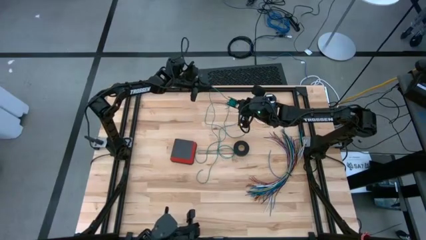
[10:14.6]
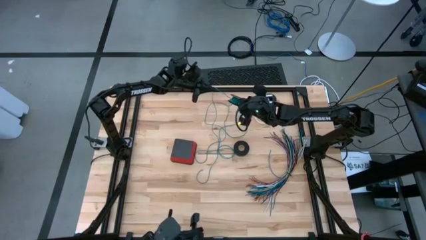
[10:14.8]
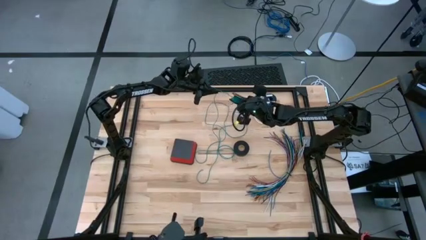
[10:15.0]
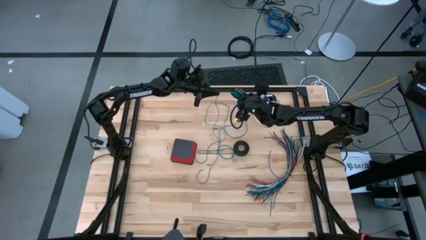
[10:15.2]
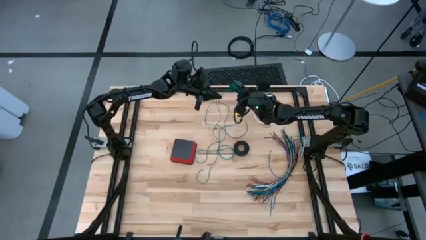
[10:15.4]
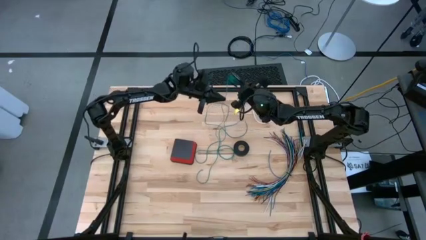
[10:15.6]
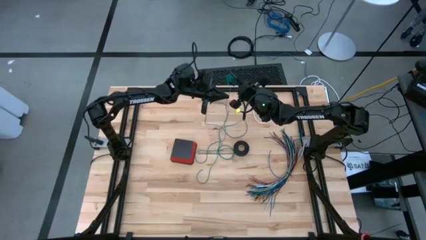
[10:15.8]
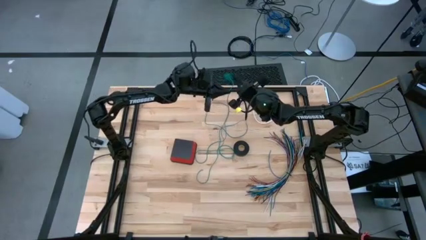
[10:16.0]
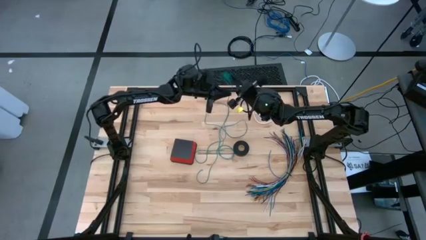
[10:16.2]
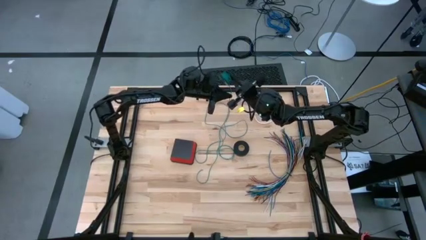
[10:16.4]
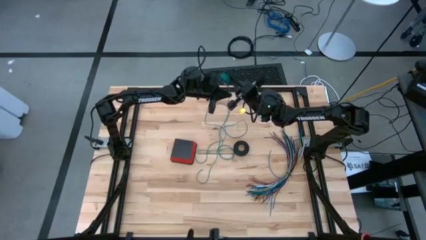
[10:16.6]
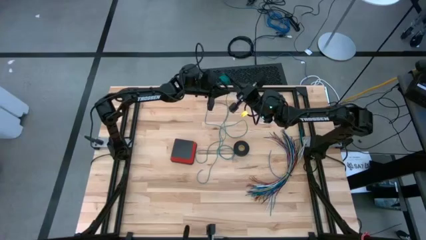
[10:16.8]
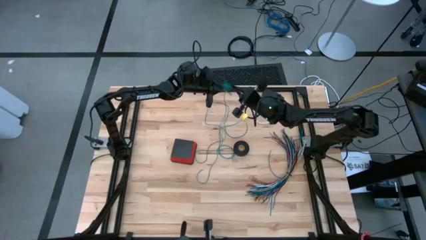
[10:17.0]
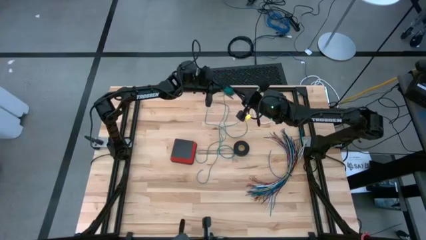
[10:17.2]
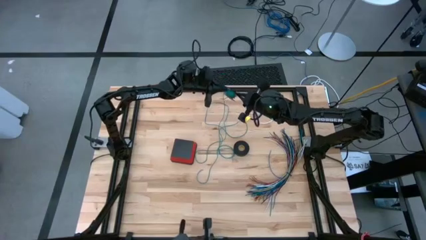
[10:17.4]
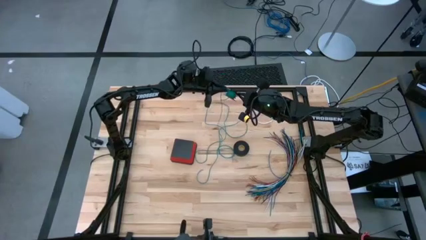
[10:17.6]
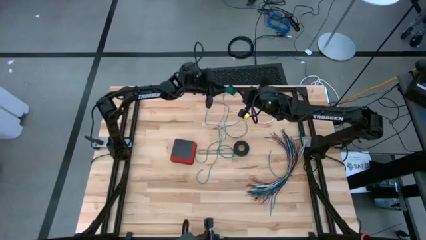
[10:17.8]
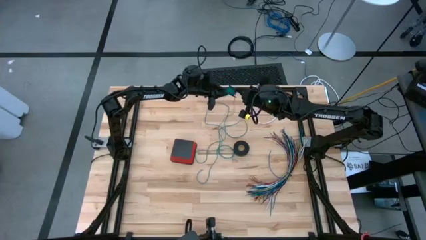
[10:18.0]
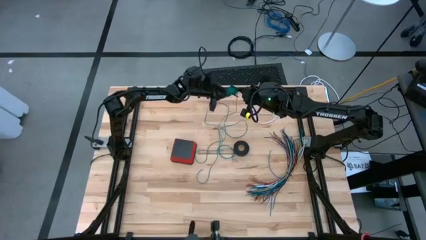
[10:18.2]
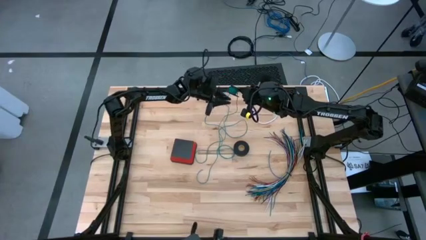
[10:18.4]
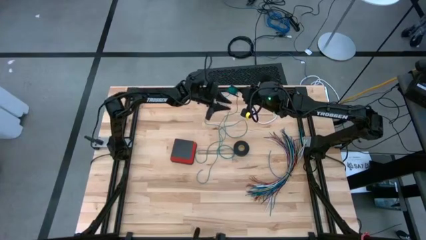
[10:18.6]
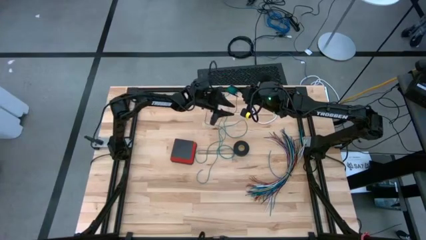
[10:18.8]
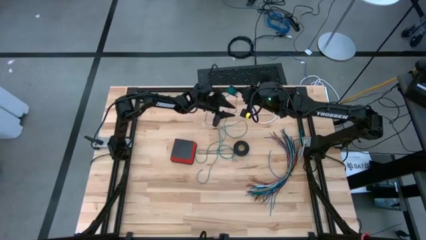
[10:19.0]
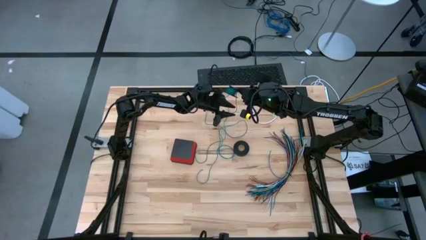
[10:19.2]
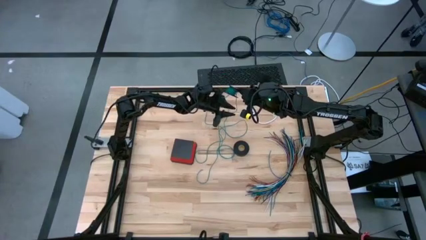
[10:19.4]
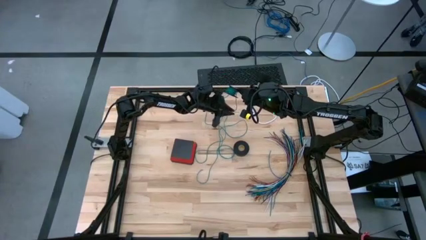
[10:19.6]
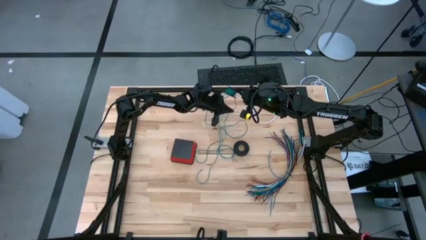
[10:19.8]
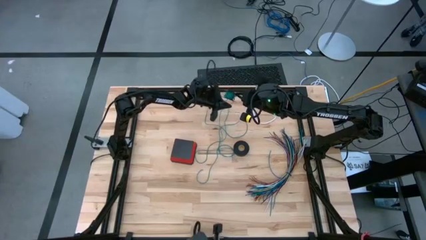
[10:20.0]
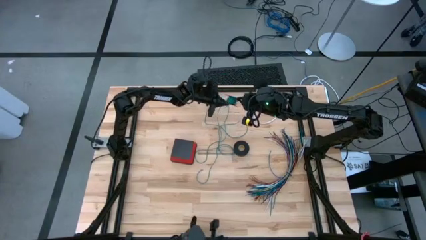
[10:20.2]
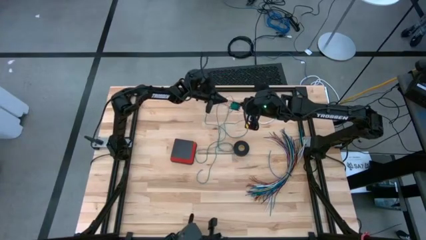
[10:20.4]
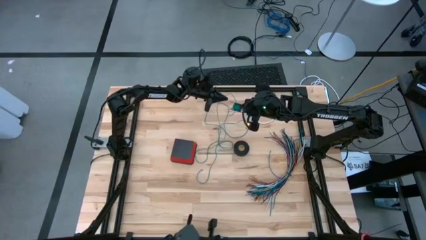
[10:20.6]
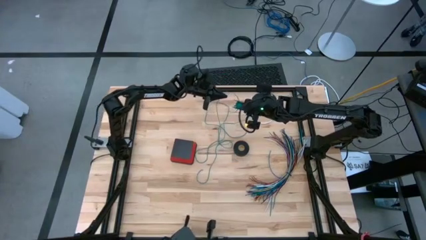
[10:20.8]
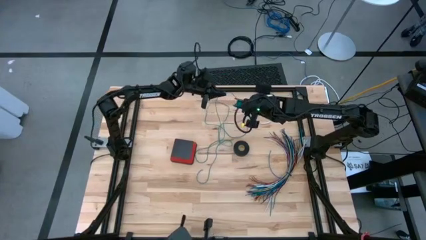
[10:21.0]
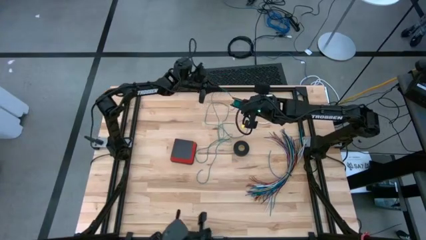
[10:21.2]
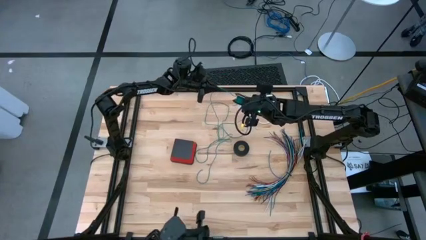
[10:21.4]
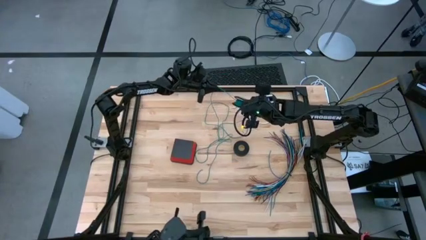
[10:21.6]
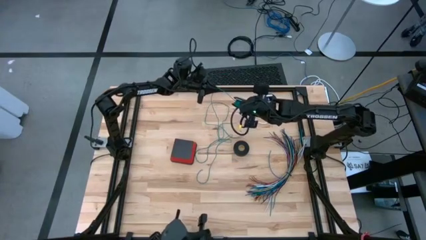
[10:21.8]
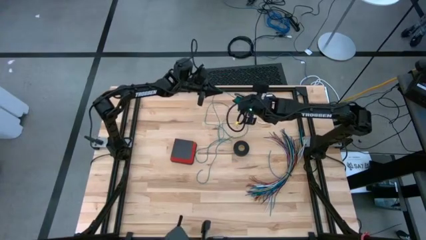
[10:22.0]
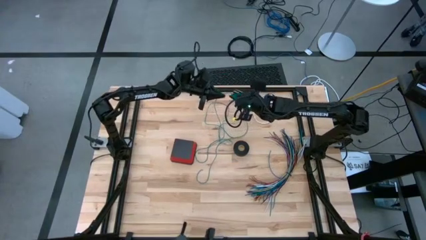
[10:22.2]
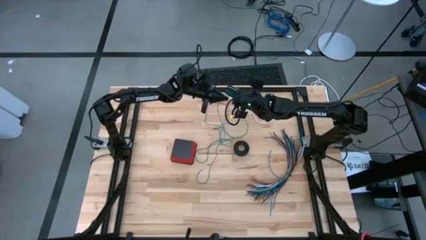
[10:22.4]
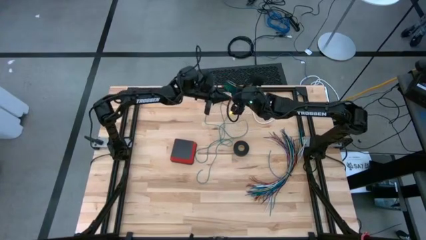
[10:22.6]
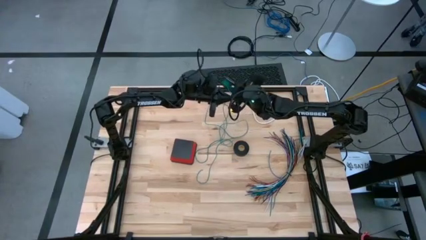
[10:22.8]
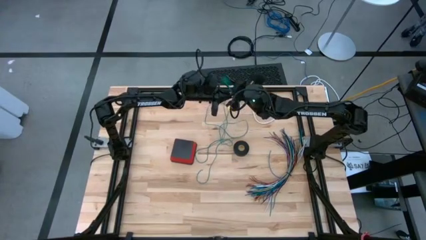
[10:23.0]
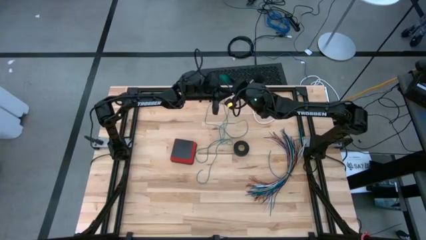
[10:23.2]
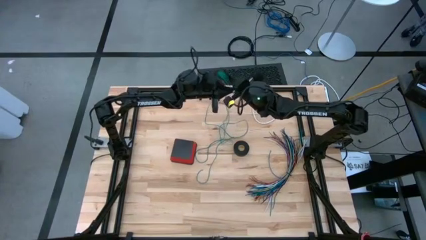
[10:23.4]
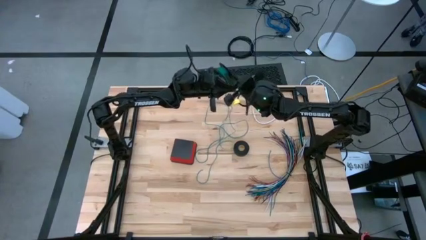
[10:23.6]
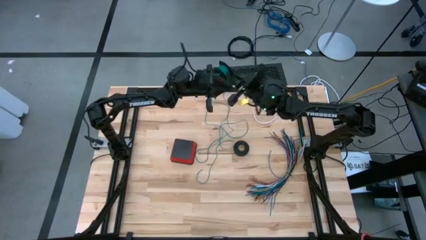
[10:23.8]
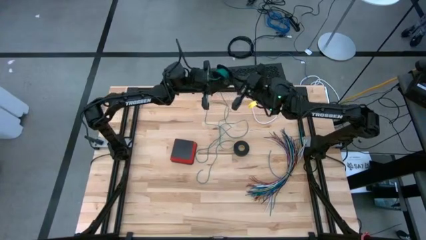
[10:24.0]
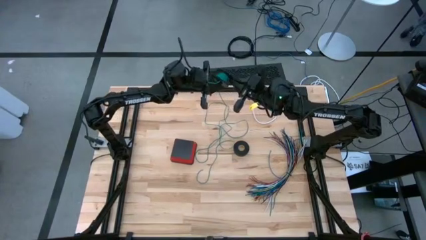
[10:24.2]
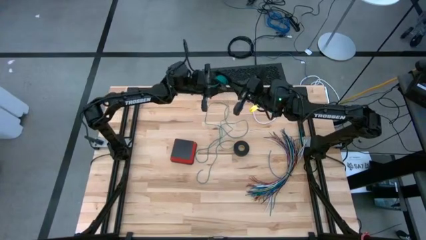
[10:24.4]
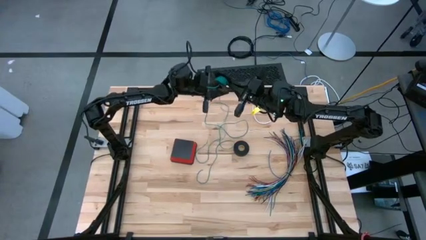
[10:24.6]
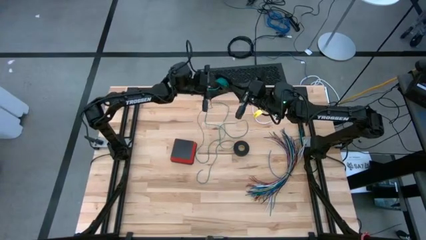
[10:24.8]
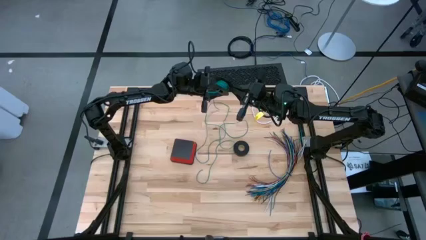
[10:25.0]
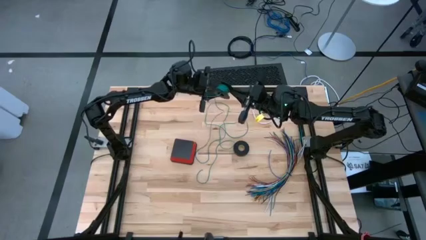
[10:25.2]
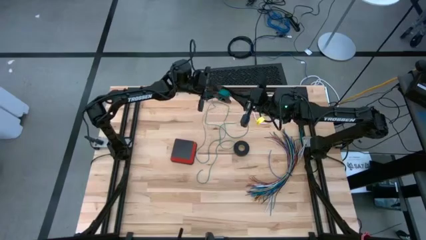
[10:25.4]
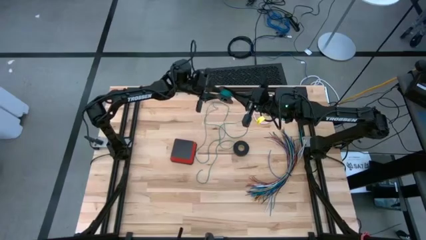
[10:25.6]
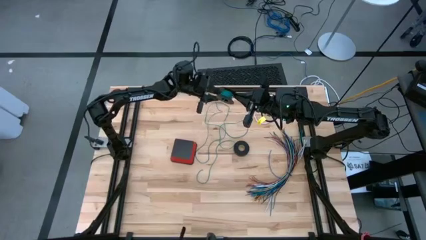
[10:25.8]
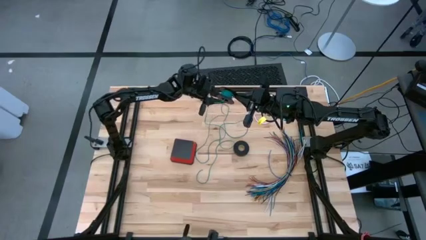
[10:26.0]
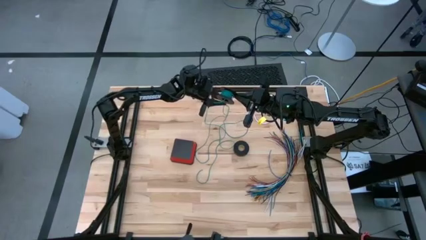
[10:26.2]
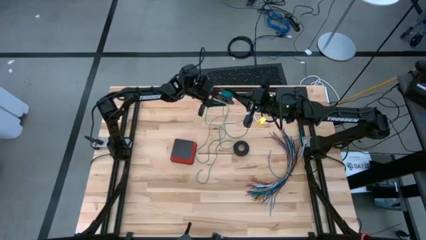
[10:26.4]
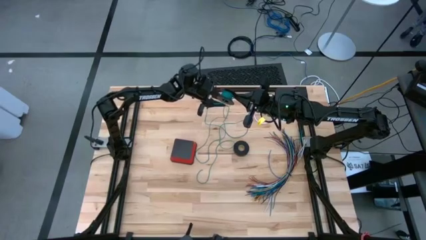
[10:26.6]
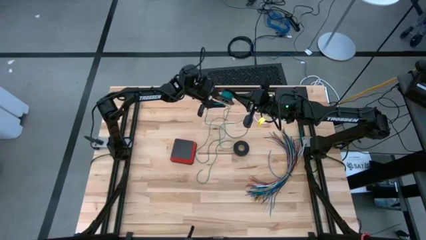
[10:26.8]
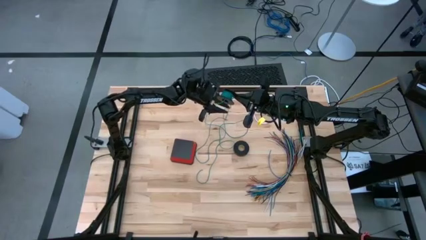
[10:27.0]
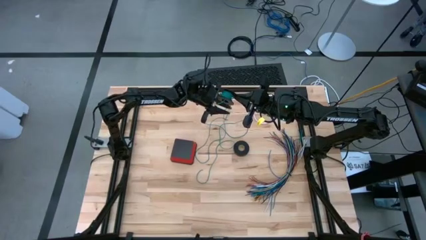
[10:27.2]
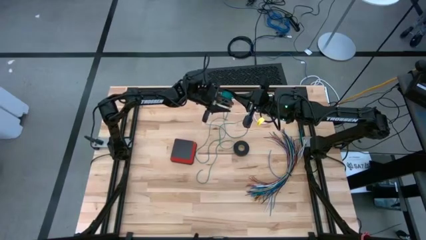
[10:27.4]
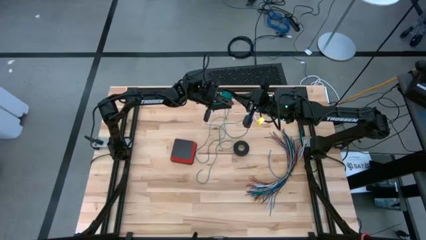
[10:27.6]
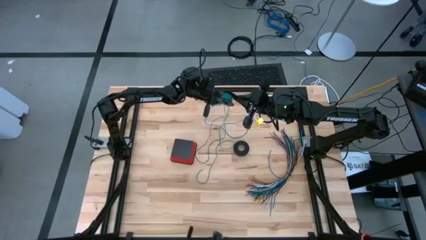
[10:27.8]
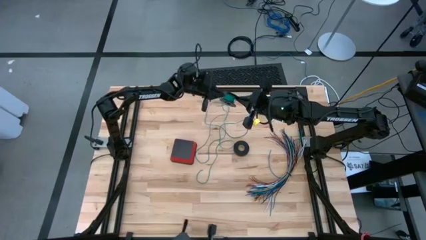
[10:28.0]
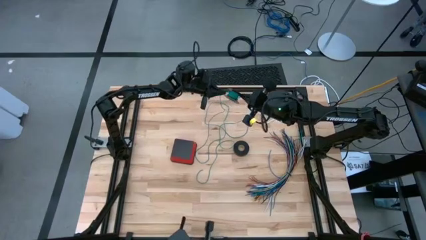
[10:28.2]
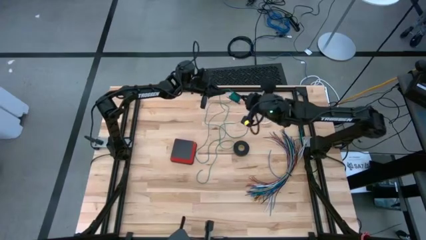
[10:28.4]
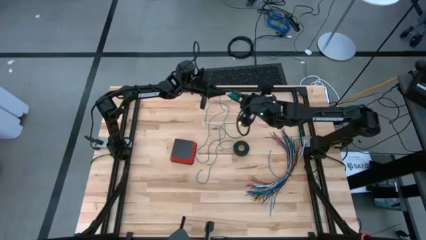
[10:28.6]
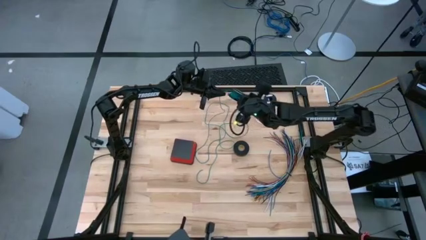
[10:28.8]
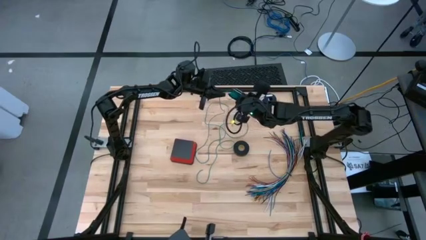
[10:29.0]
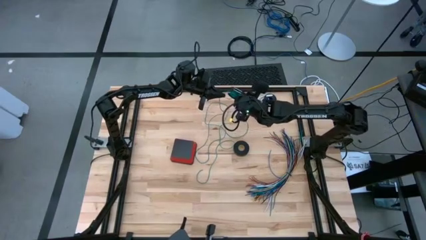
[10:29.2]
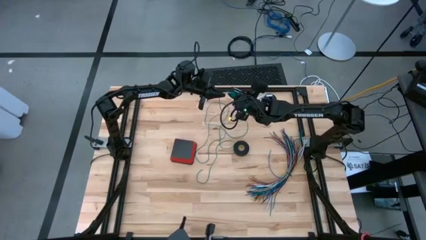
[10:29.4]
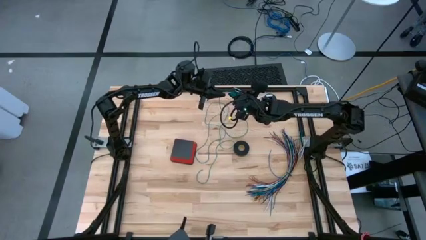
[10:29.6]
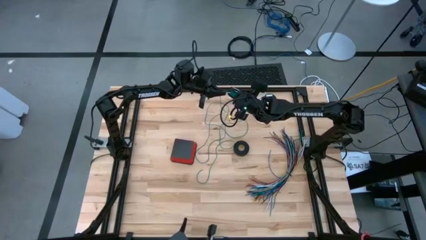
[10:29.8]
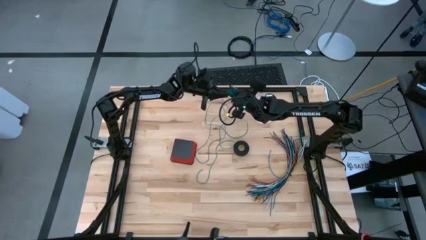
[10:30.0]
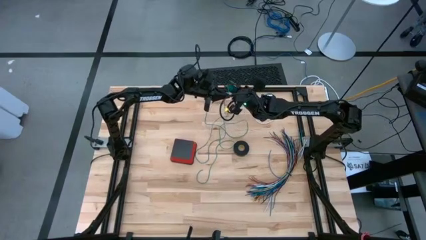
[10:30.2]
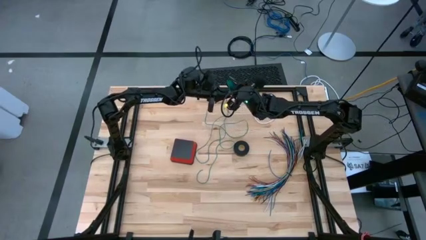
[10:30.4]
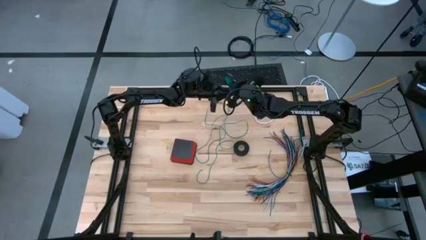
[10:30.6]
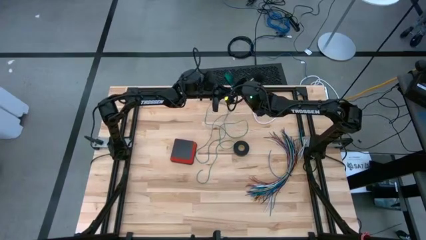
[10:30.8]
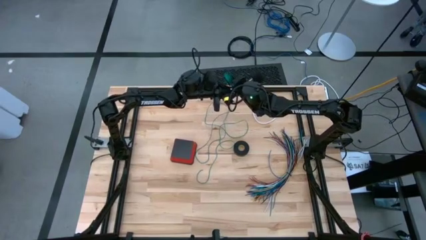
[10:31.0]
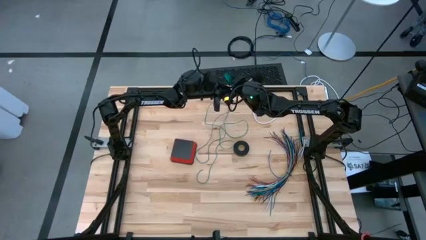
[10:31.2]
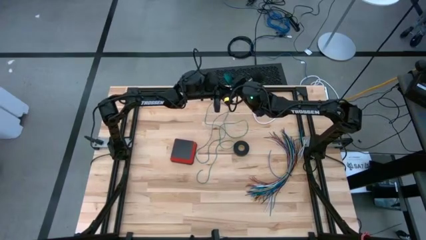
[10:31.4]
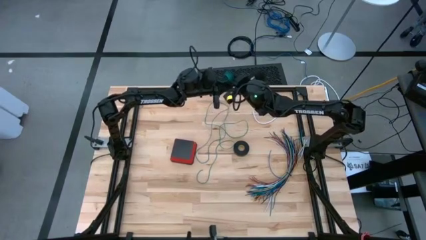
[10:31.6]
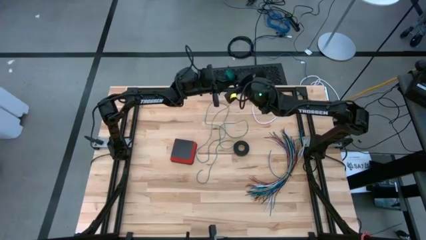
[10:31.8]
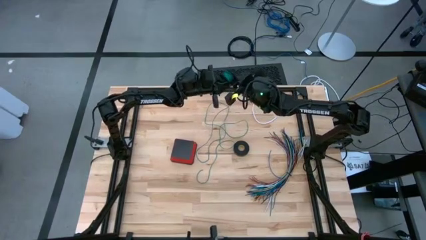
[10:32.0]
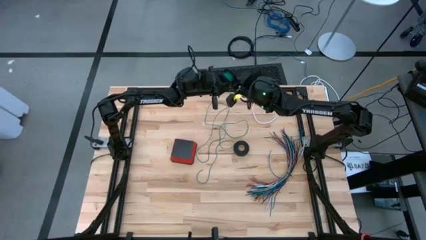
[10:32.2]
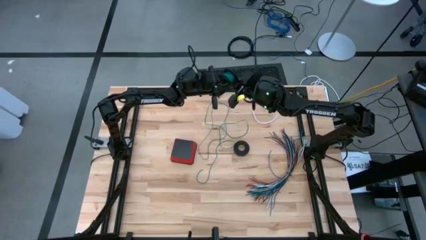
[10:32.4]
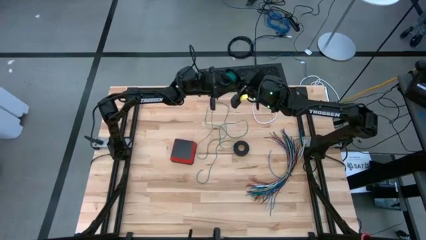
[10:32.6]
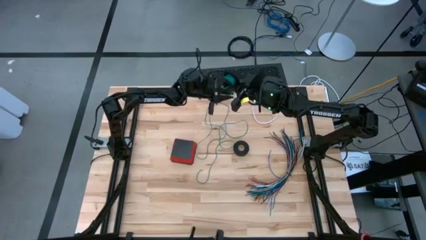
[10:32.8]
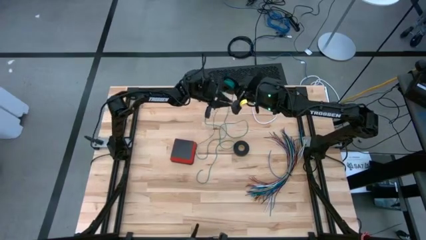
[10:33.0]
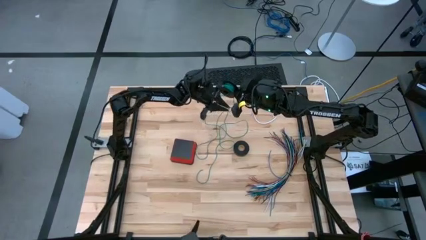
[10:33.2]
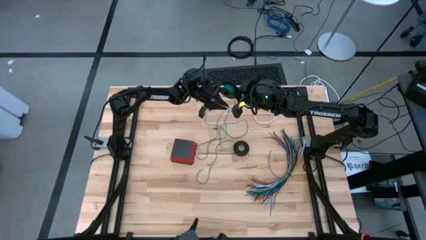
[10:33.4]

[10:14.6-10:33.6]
Task: Coiling cords
Coil the green wire cable on the spool
